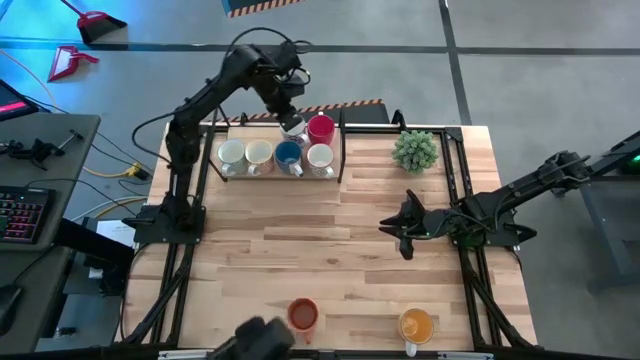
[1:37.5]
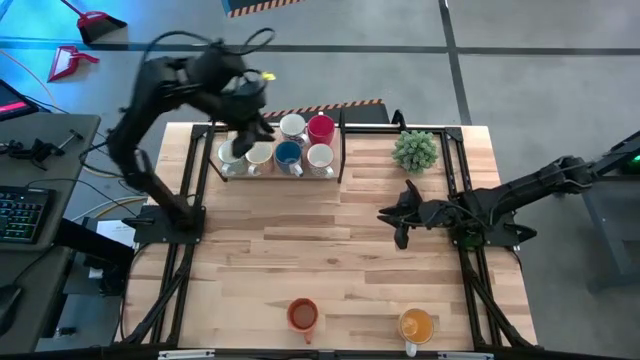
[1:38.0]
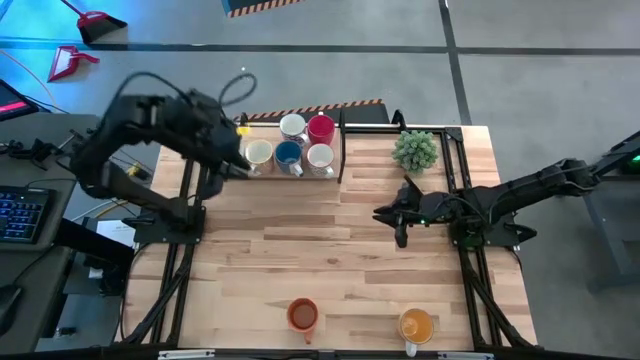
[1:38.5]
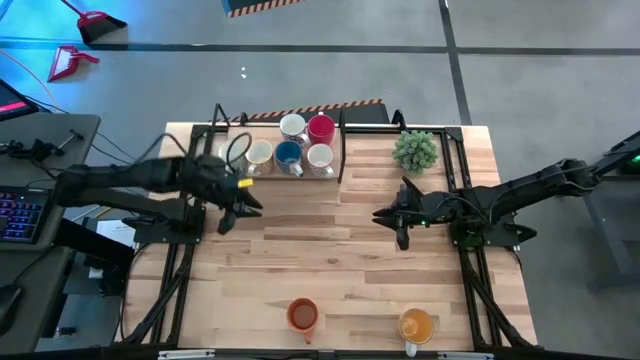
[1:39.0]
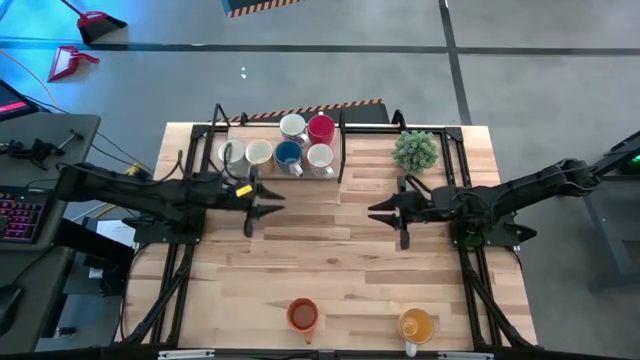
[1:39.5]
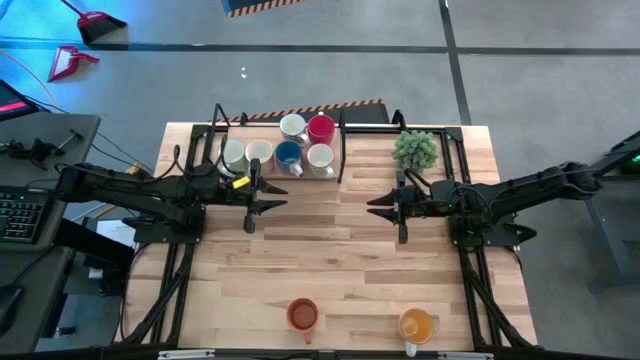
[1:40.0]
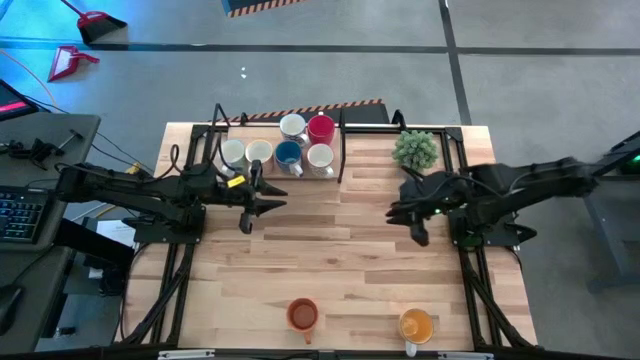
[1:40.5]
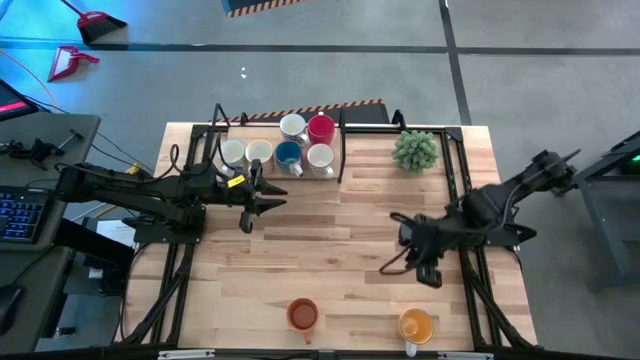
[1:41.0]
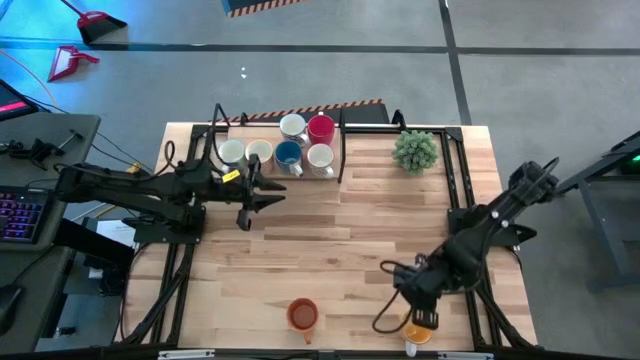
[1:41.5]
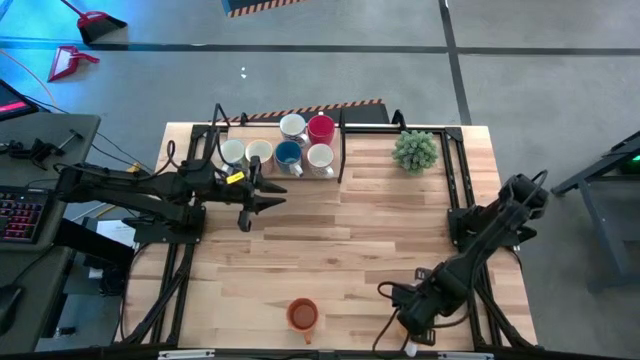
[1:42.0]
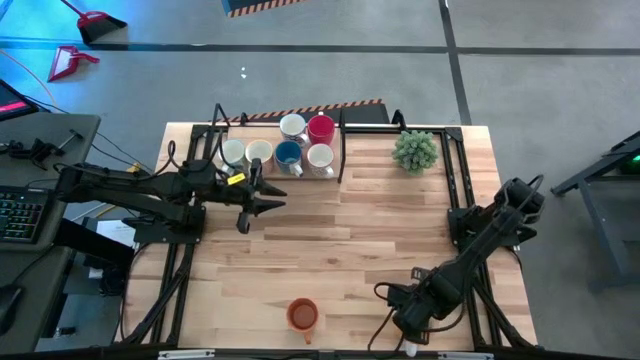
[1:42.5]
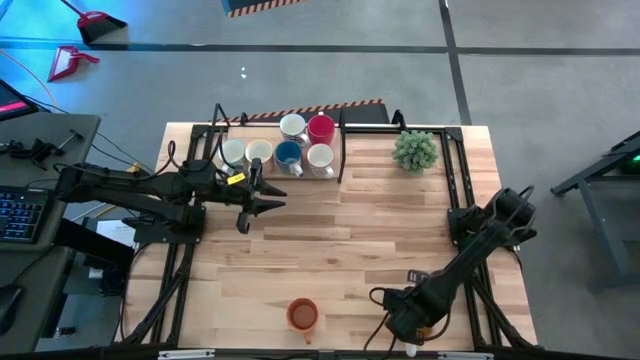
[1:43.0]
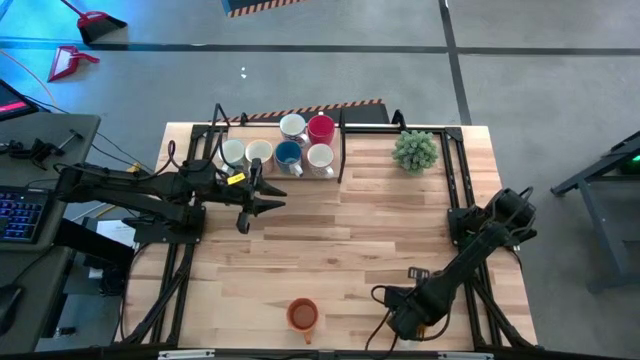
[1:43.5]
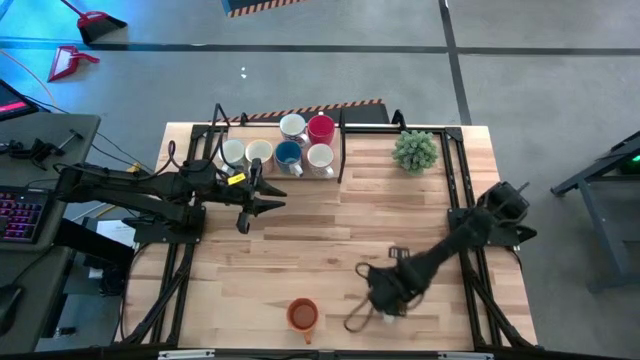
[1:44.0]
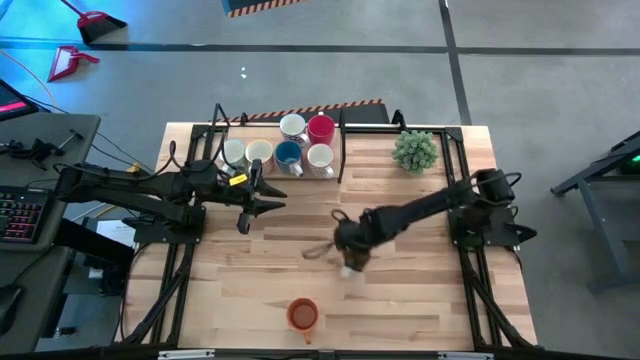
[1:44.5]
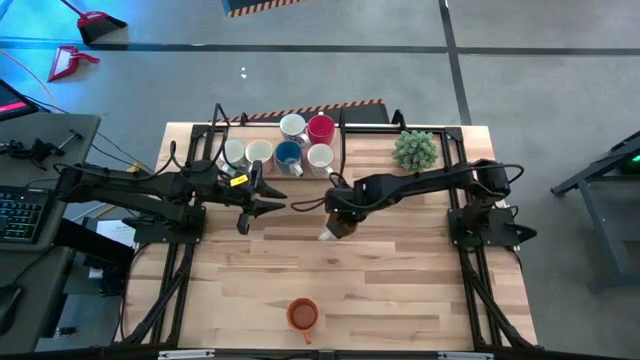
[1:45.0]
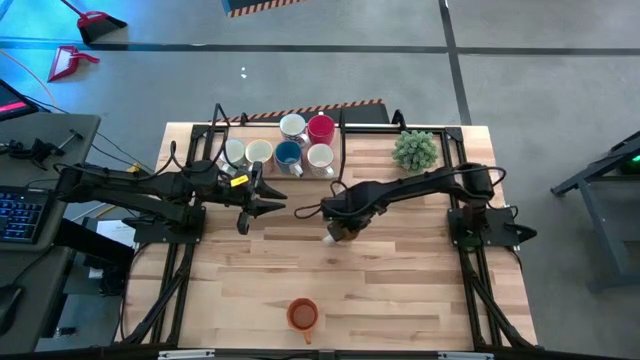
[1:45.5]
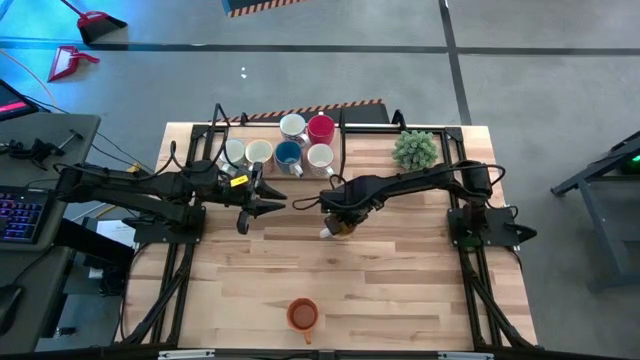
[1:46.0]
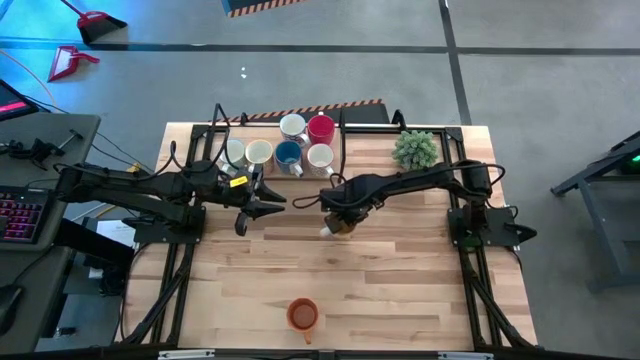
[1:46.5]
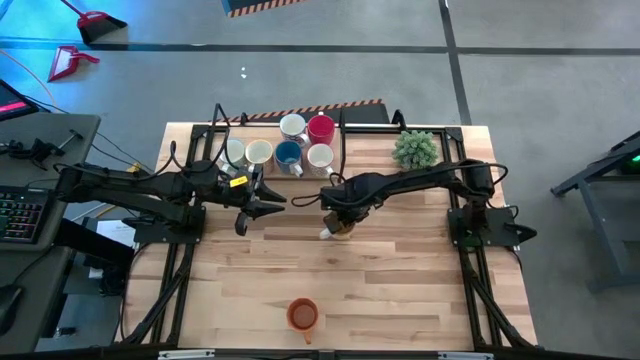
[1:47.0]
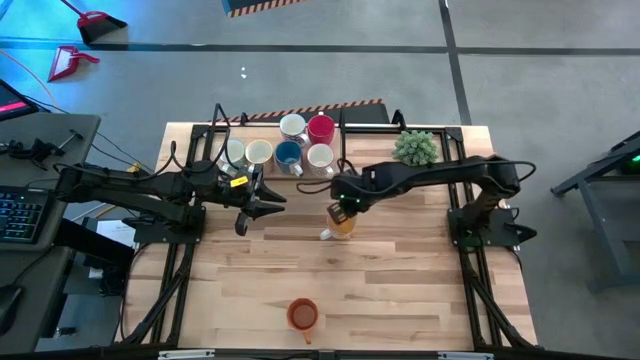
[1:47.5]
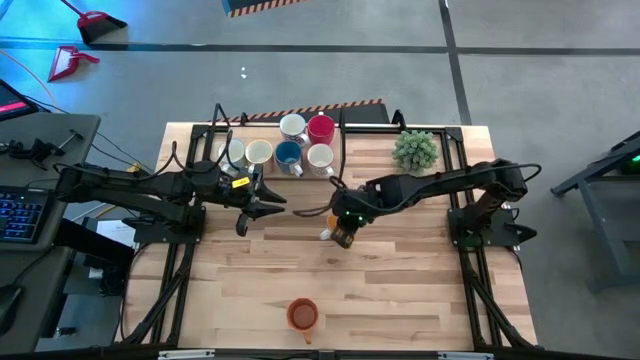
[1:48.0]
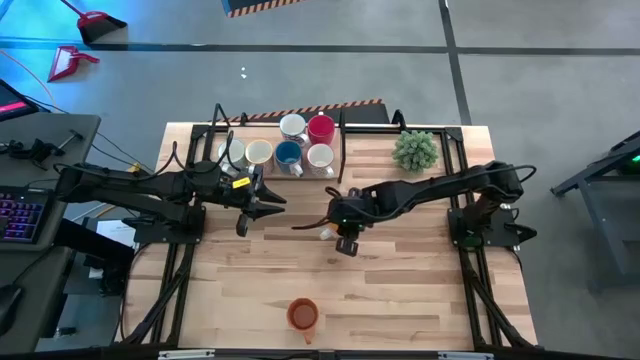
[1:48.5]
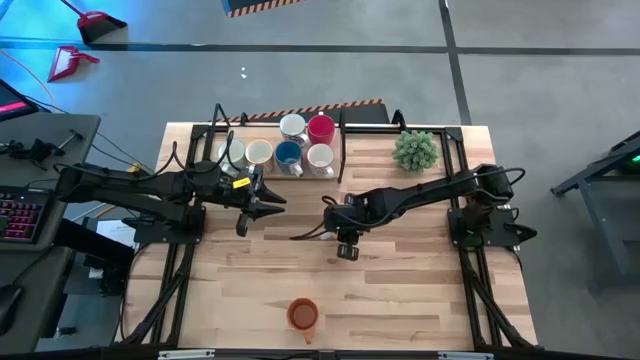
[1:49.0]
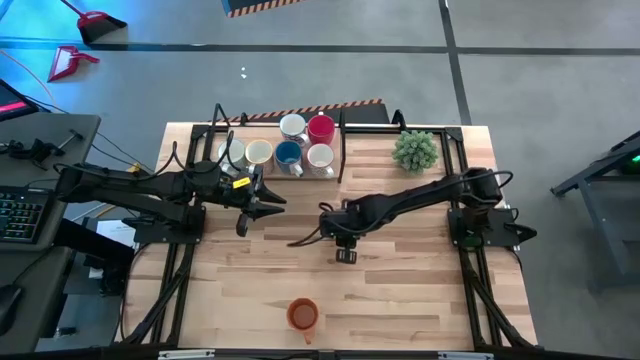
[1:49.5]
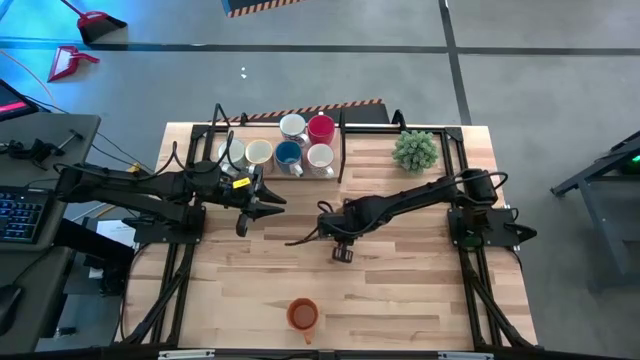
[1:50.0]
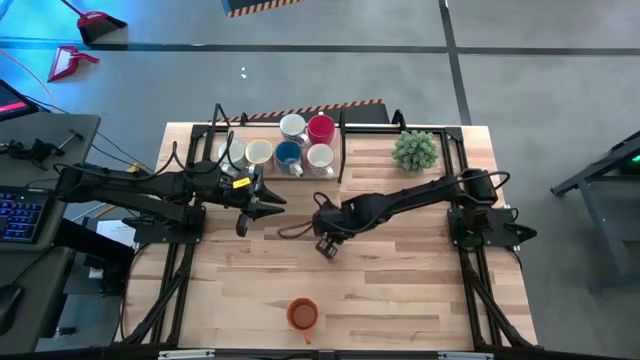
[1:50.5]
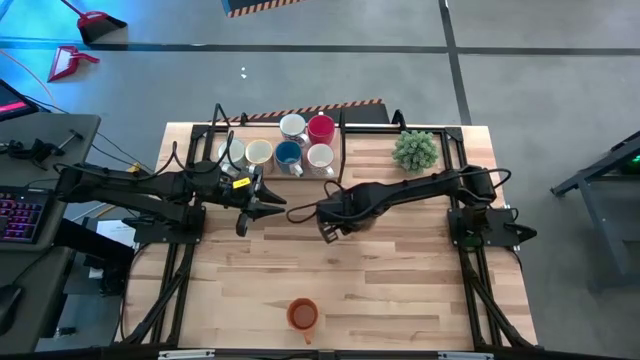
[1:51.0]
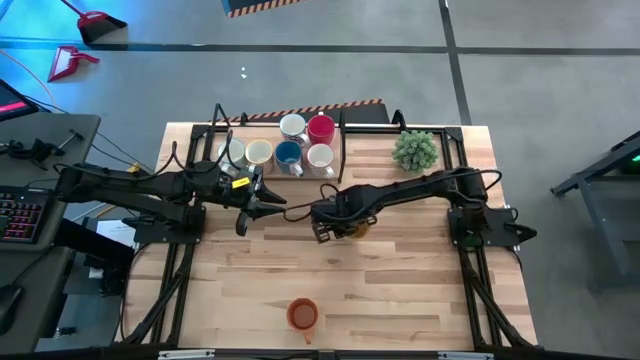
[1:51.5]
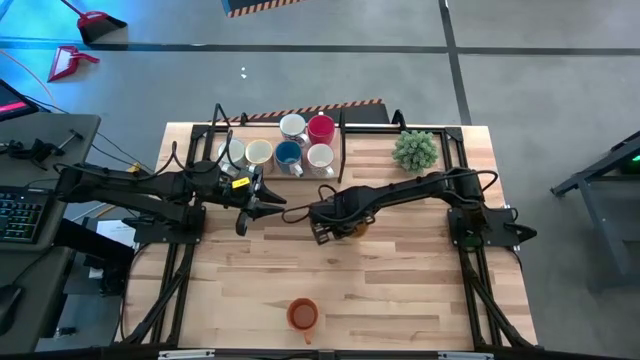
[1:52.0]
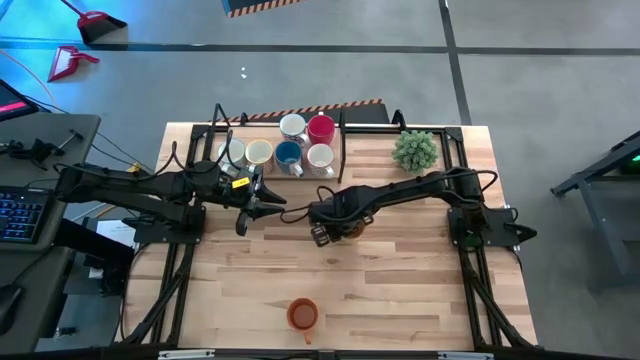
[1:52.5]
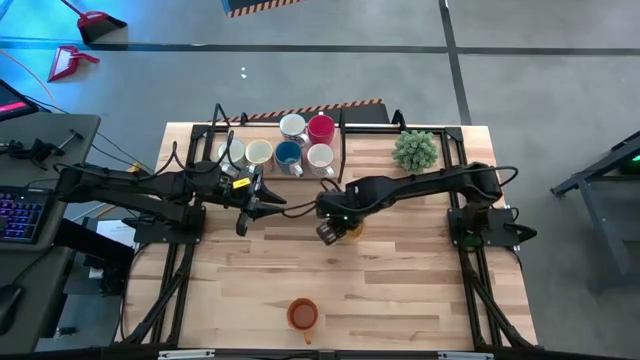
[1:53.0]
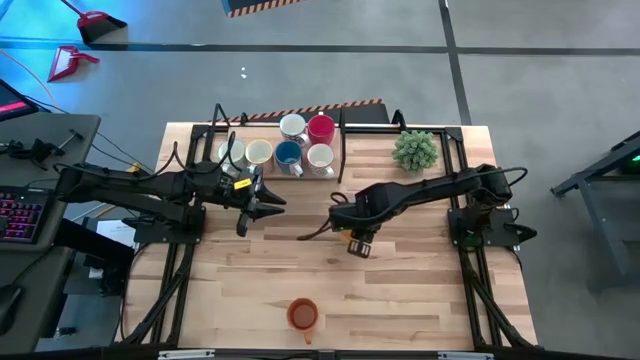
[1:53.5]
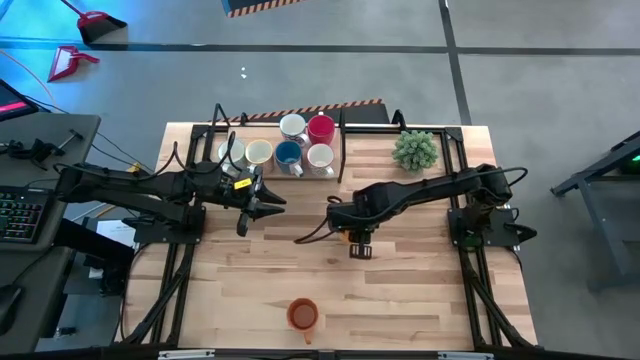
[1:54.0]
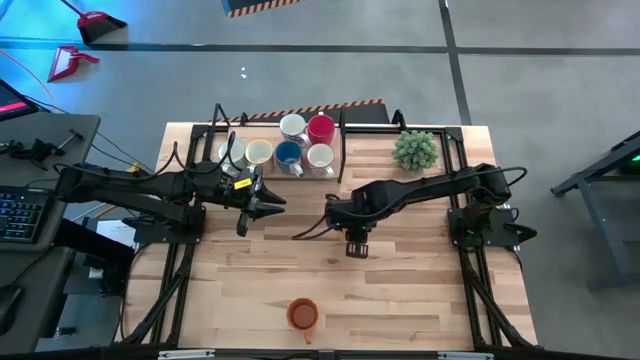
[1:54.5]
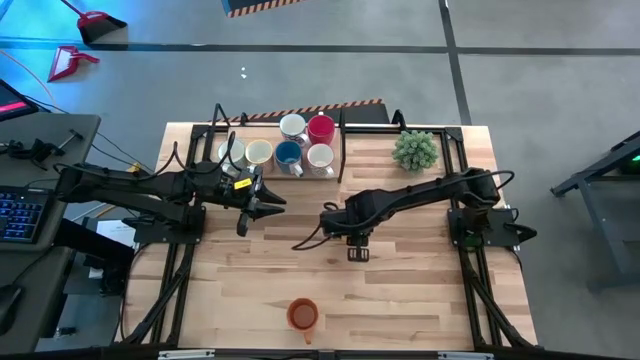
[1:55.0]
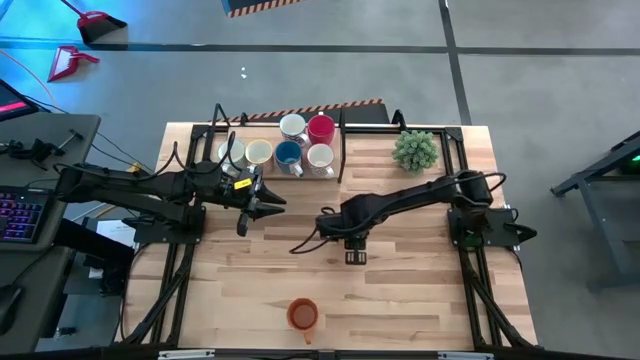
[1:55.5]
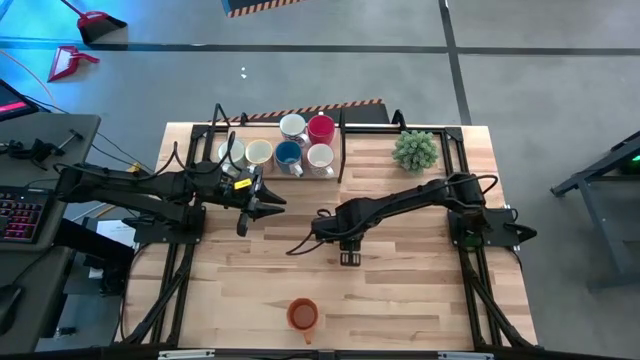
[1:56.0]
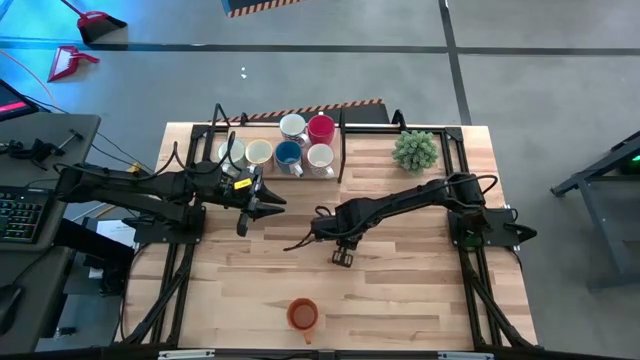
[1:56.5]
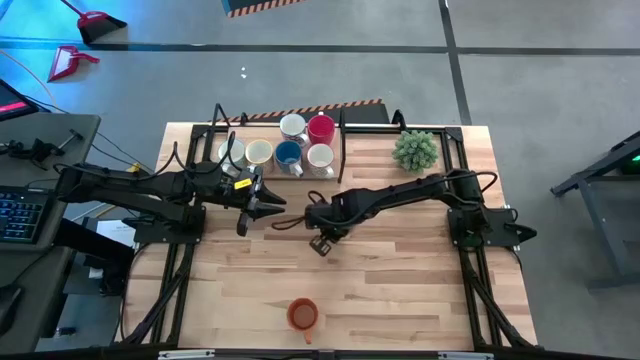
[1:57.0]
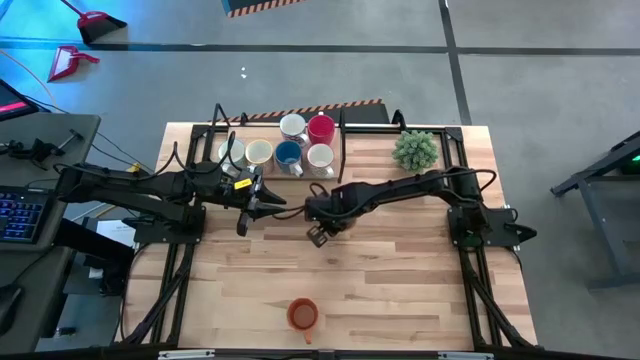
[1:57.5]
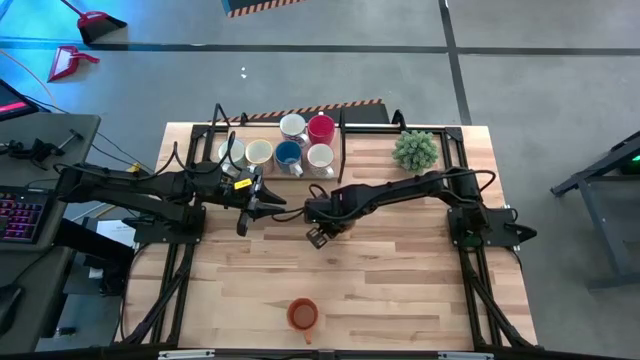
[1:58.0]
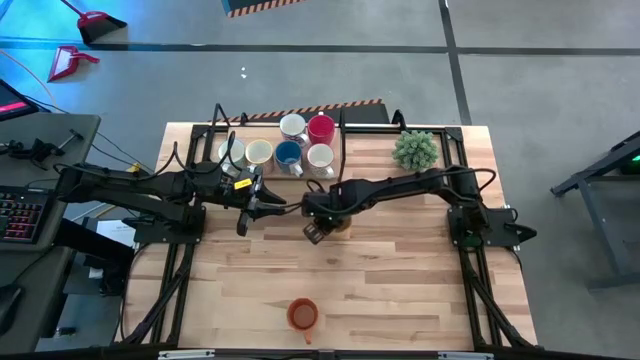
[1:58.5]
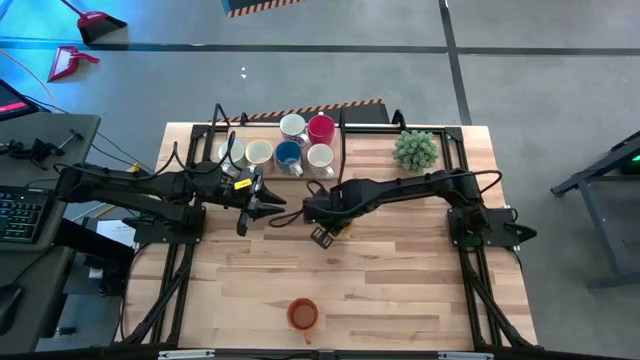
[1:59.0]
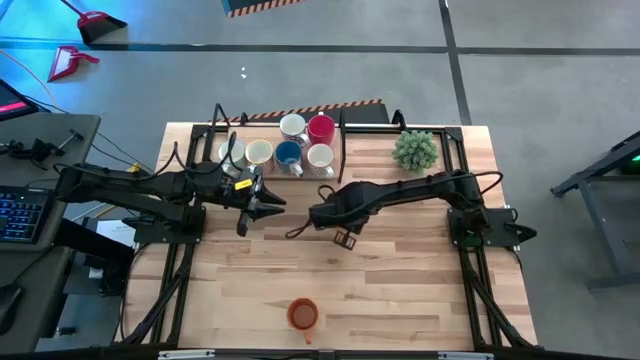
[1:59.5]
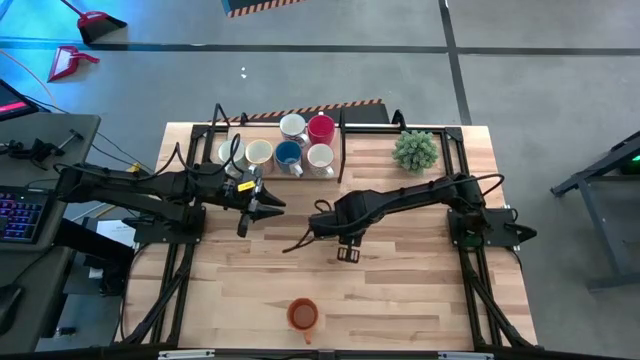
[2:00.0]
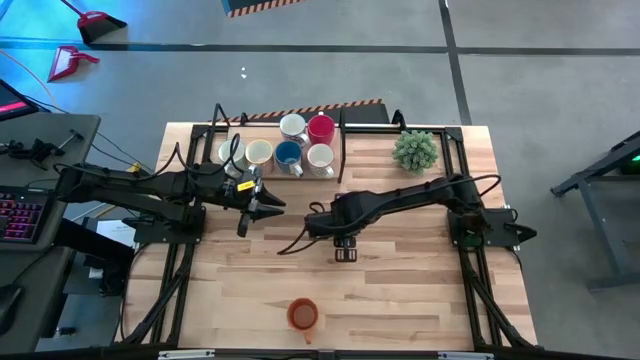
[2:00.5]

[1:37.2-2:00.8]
Task: Place coffee mugs
Put the yellow mug on the shelf
